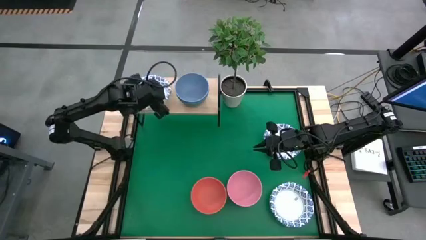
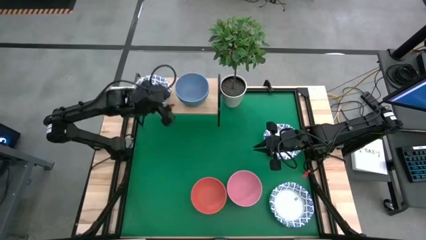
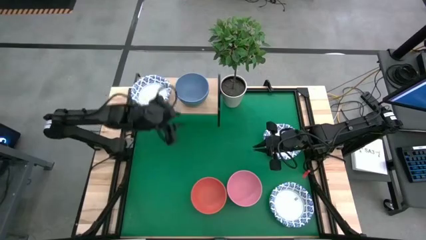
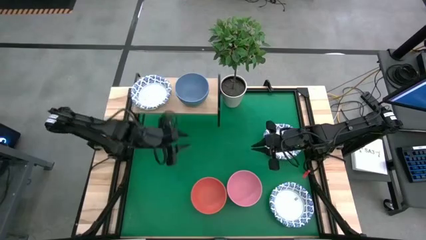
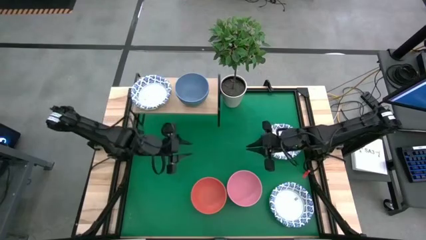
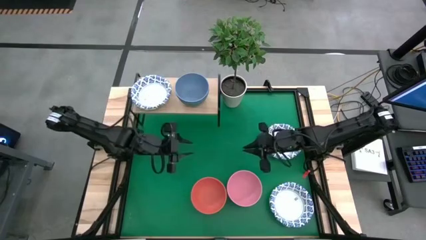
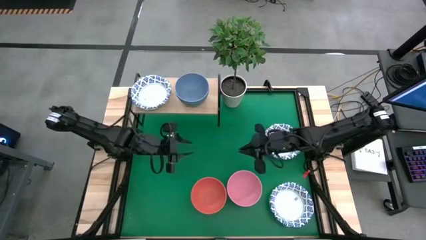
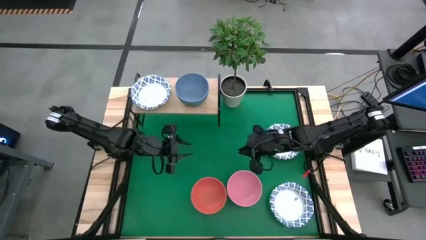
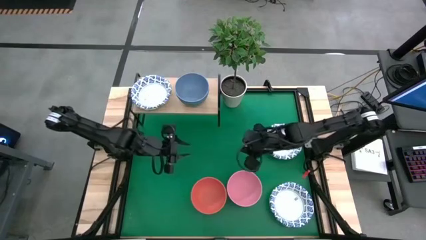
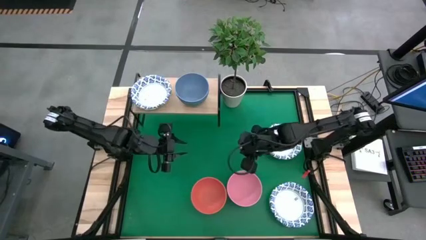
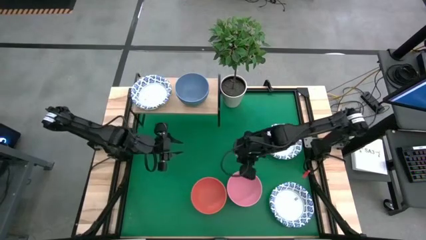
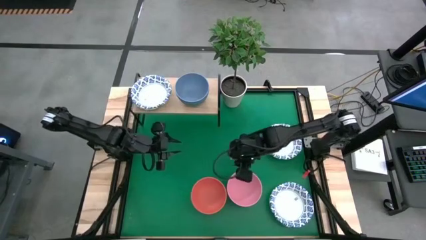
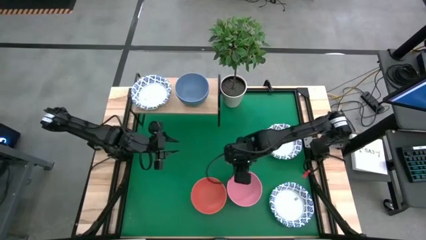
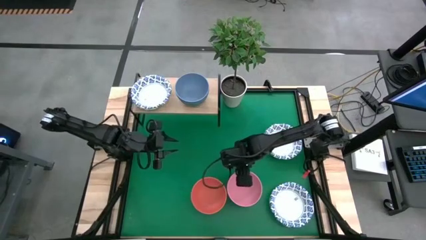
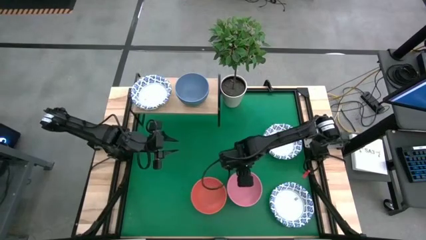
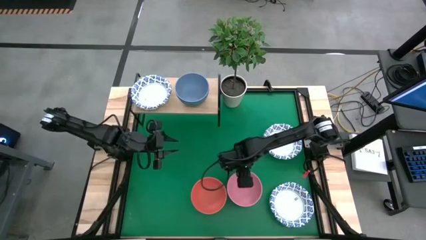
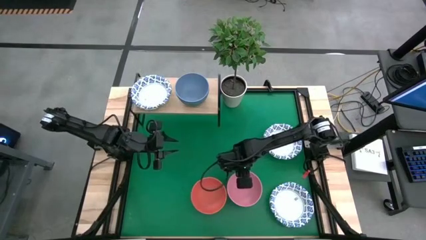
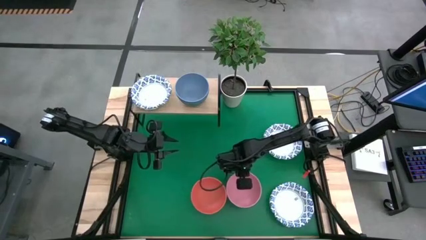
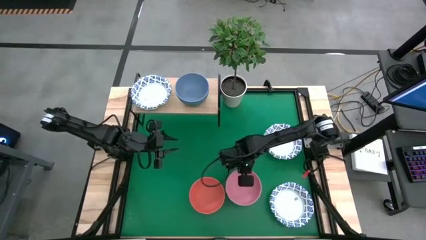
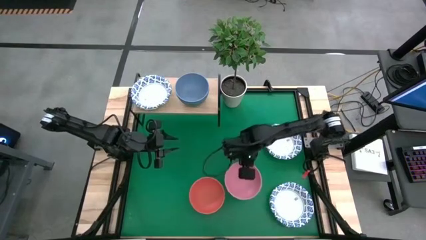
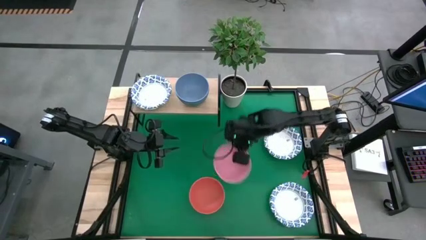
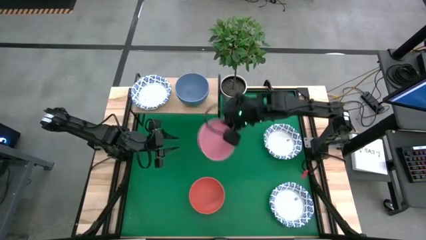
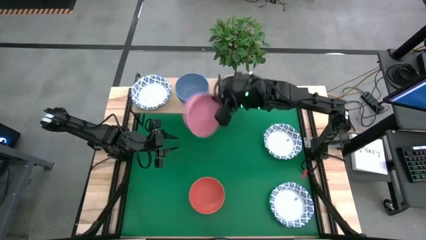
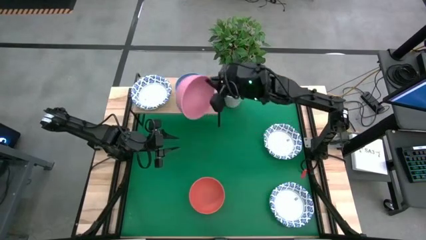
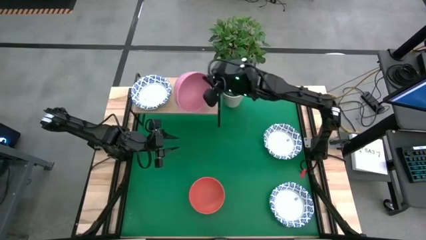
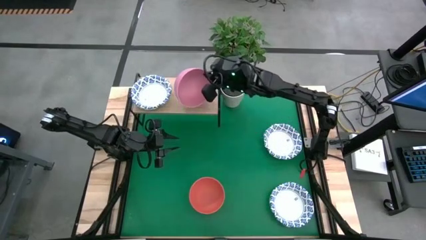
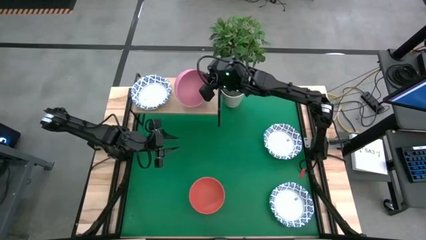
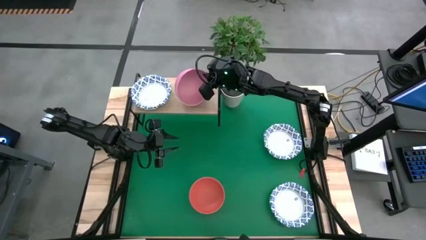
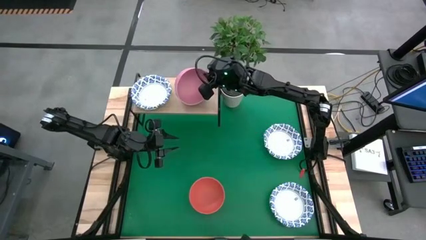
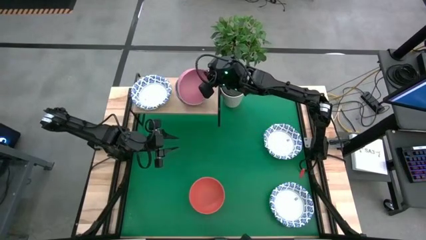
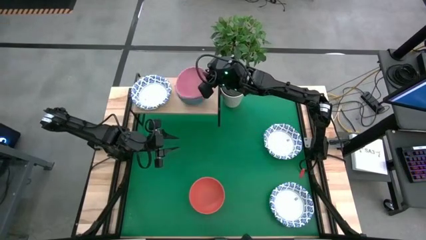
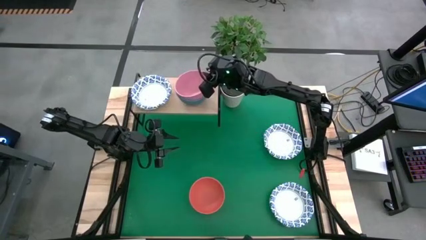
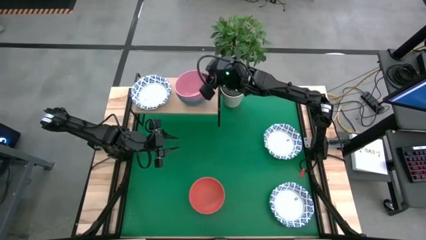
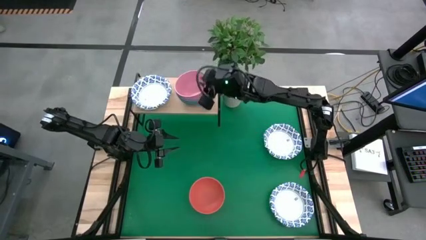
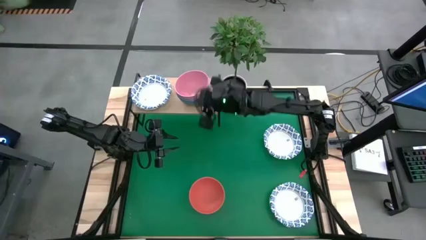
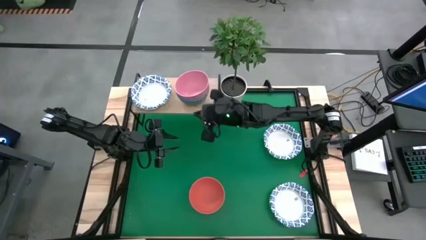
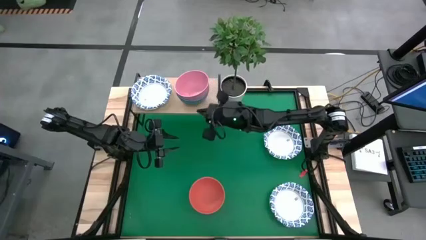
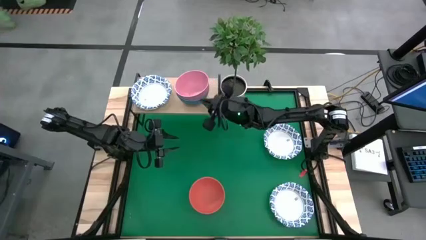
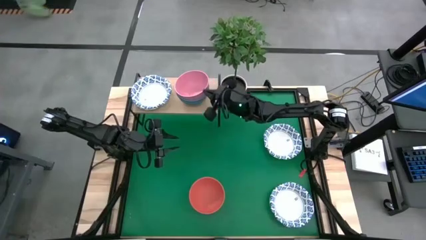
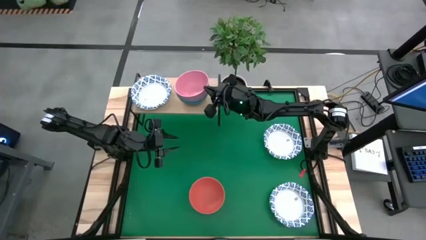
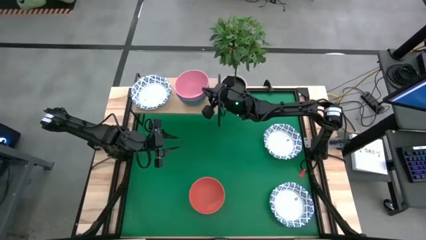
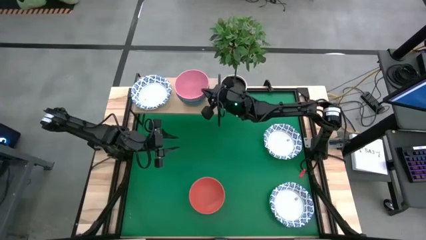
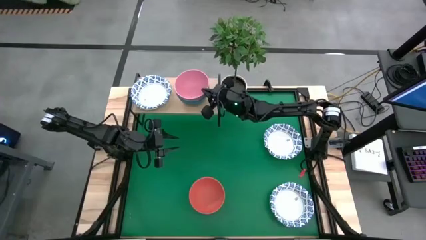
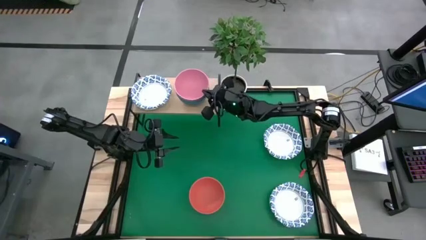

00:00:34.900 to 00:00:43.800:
Task: Place and stack bowls onto a shelf
Stack the pink bowl on top of the blue bowl on the shelf

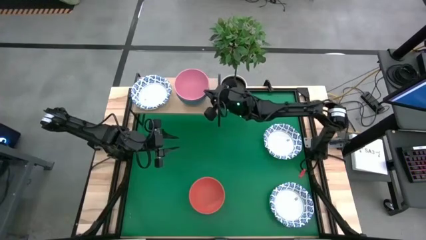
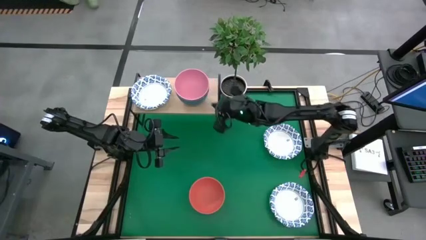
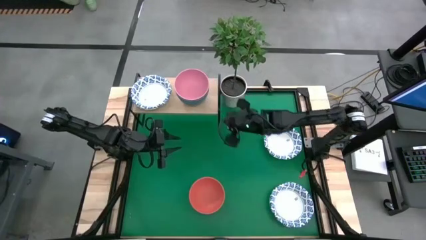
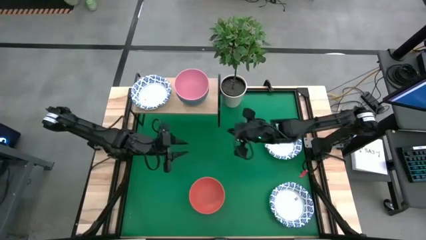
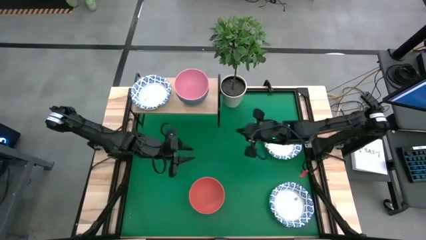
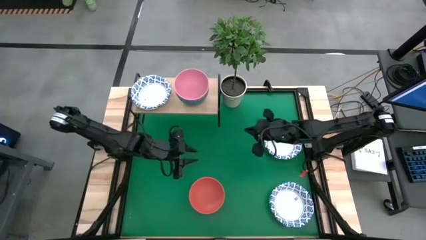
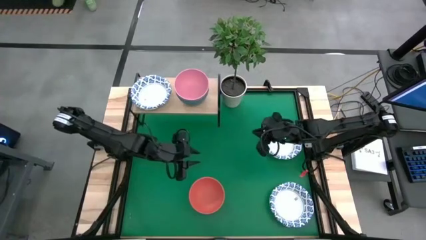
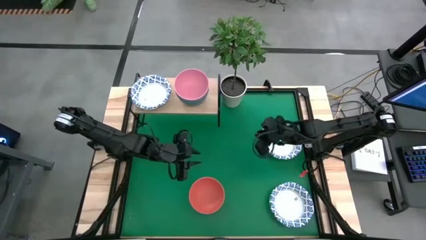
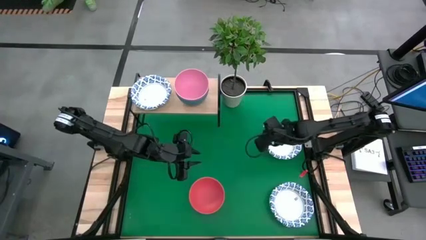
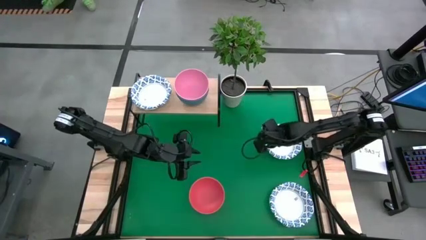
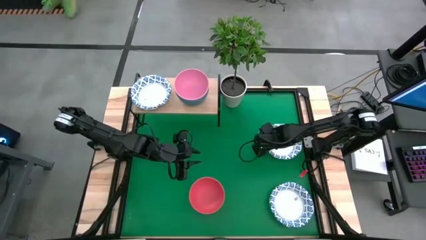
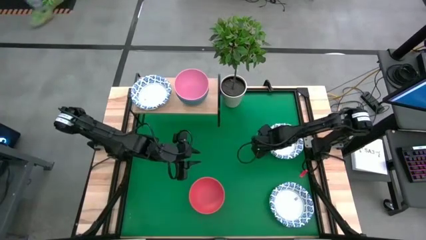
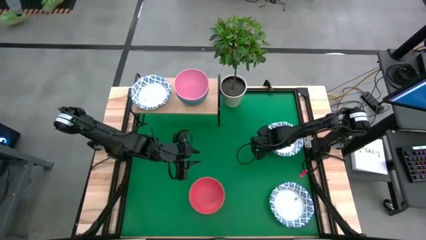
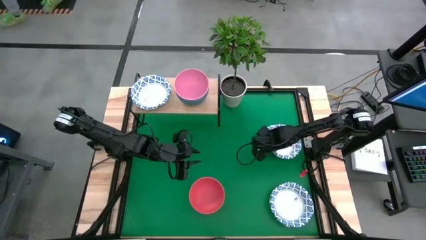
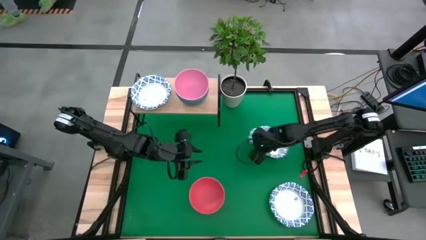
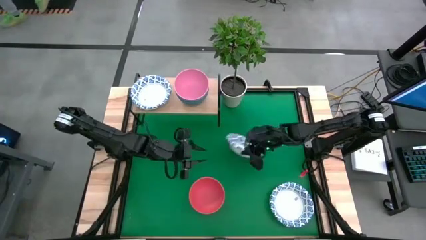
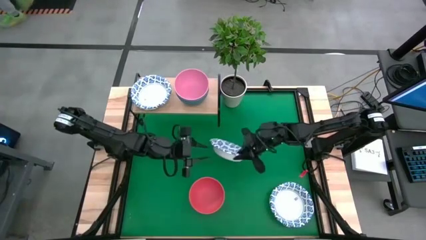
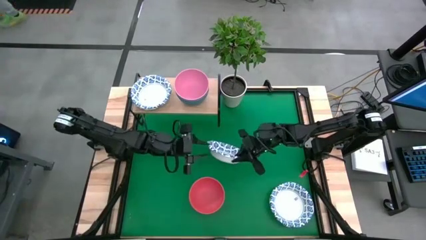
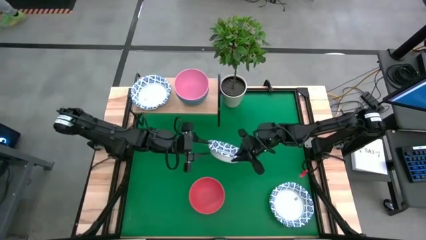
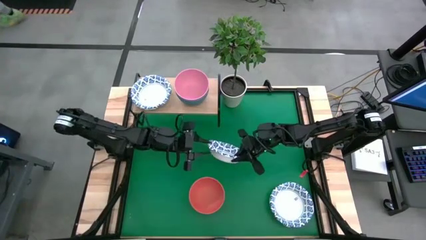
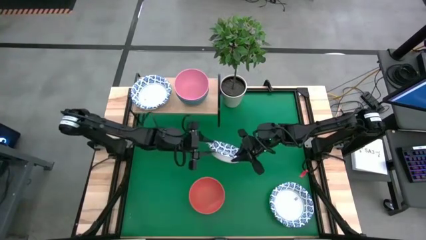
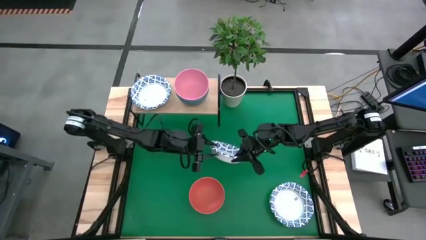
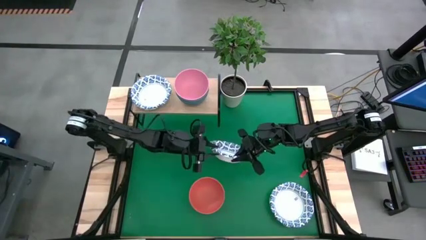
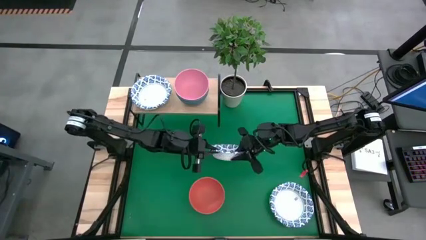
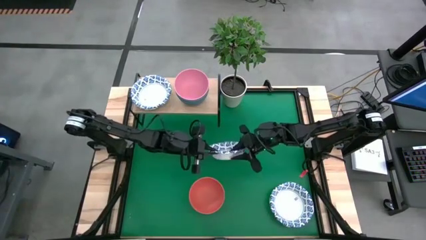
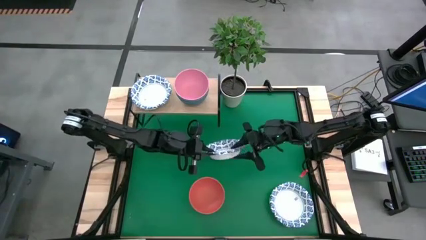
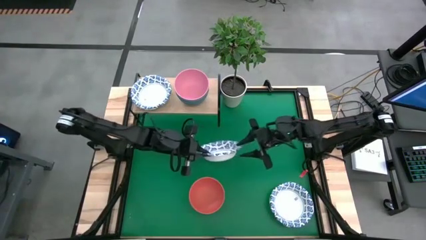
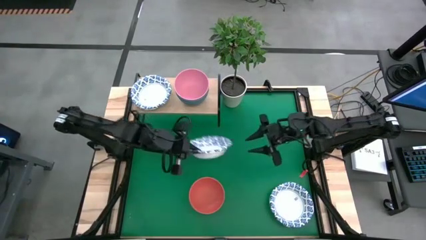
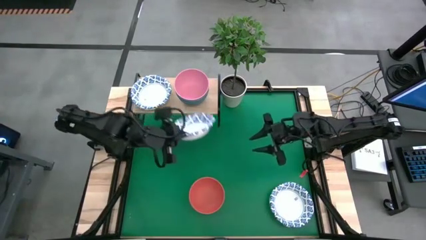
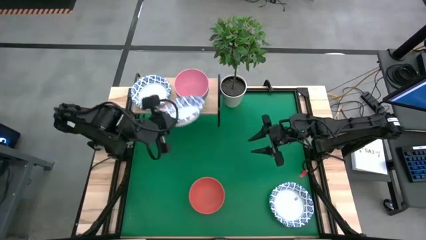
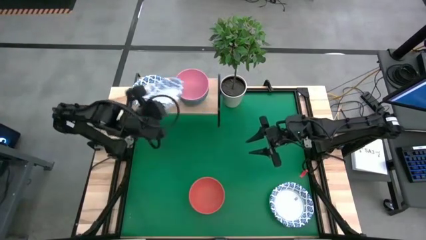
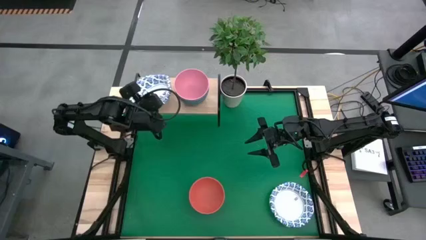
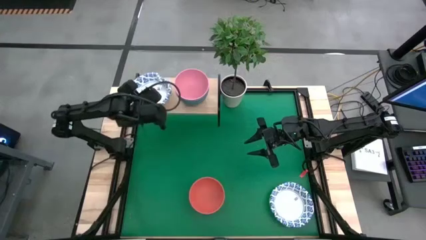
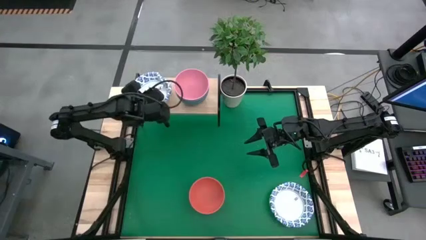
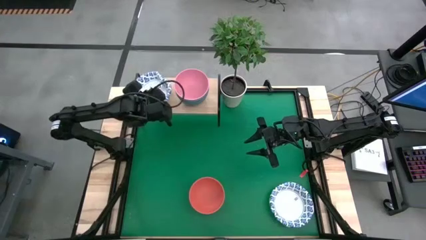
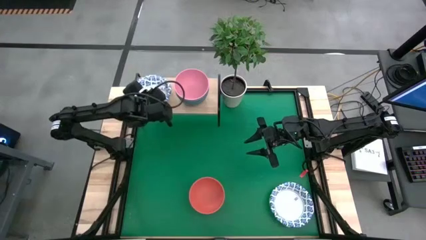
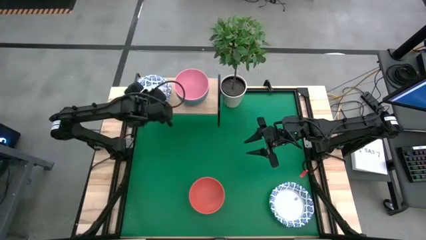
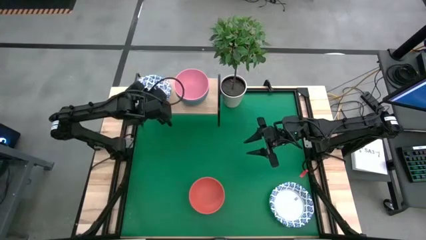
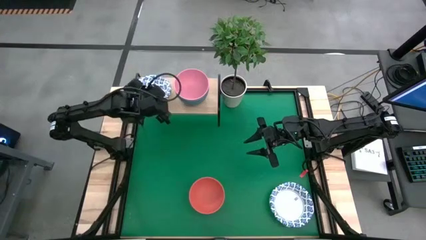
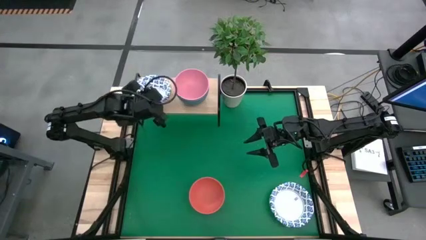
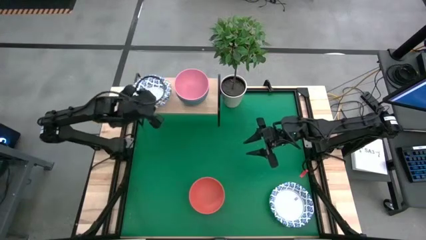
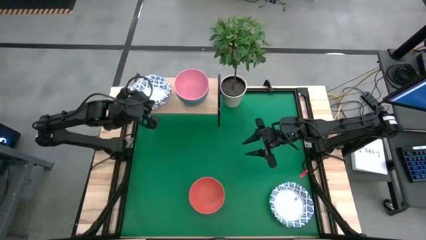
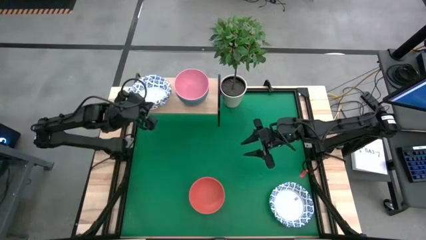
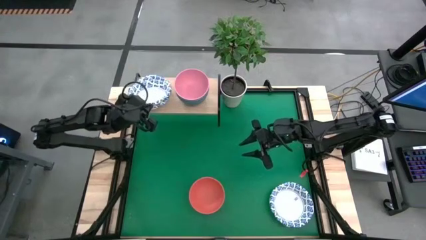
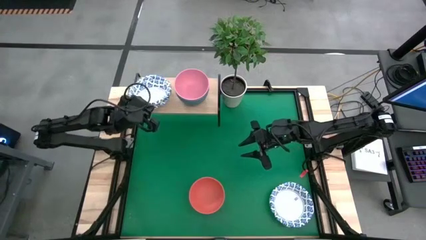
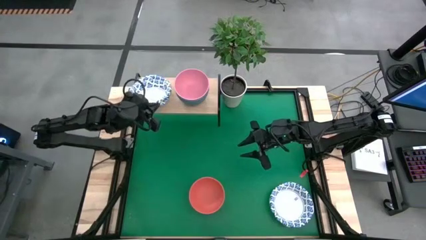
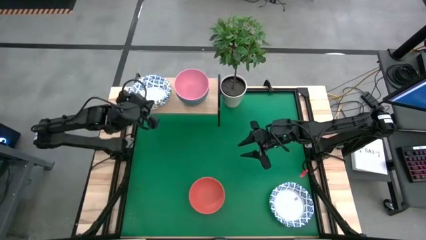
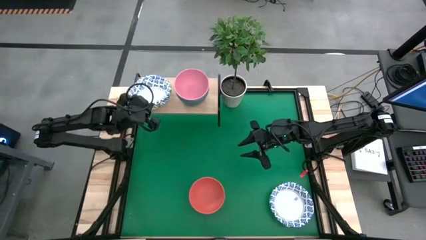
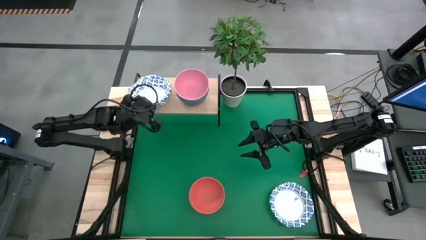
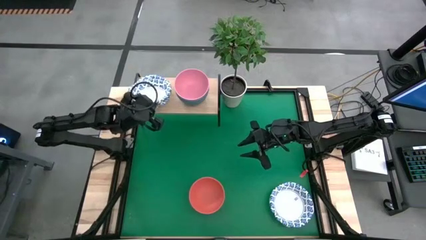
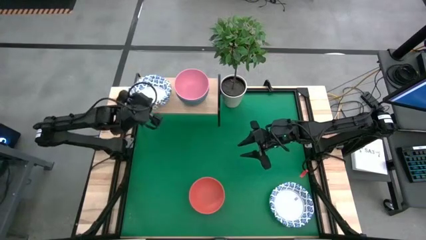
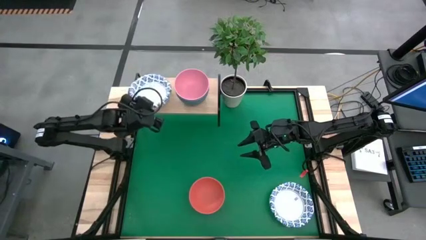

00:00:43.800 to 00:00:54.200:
Stack the white patterned bowl on top of the white patterned bowl on the shelf
